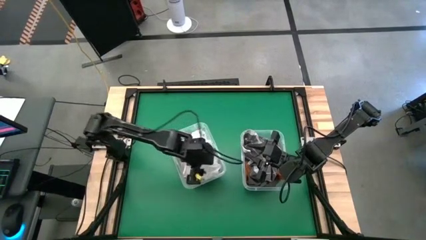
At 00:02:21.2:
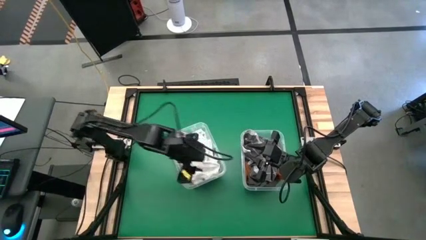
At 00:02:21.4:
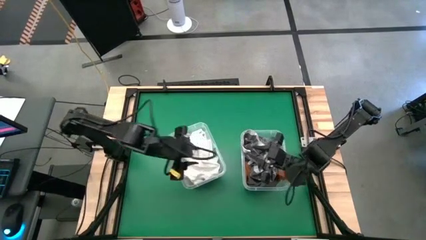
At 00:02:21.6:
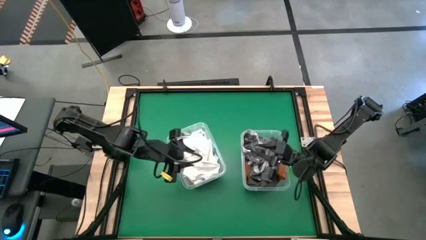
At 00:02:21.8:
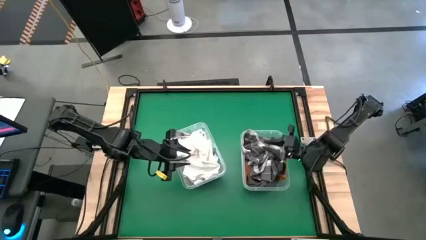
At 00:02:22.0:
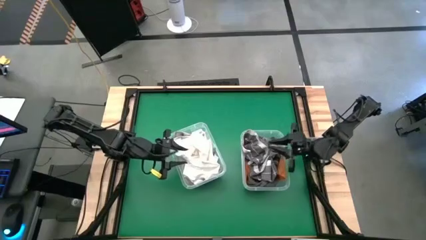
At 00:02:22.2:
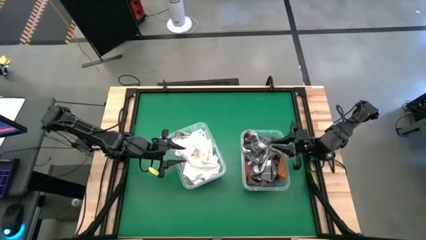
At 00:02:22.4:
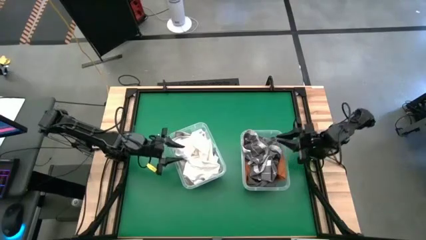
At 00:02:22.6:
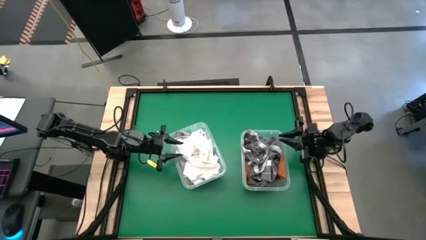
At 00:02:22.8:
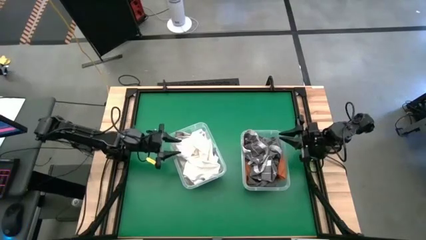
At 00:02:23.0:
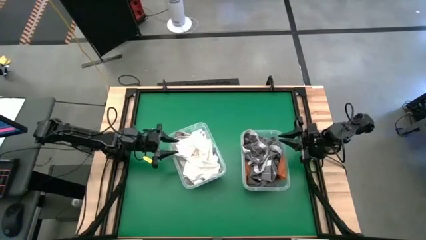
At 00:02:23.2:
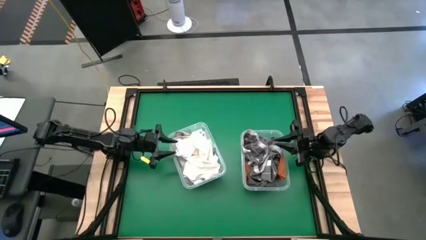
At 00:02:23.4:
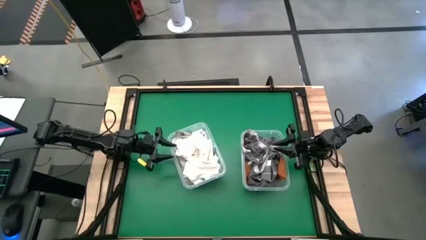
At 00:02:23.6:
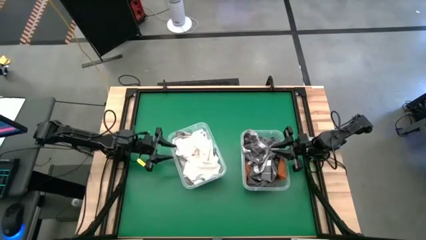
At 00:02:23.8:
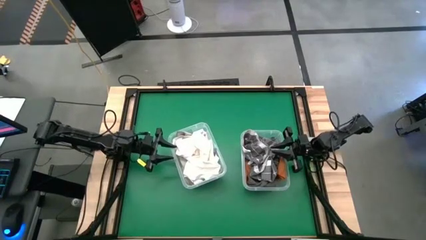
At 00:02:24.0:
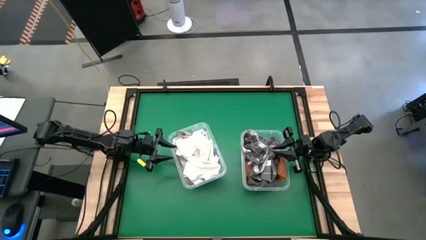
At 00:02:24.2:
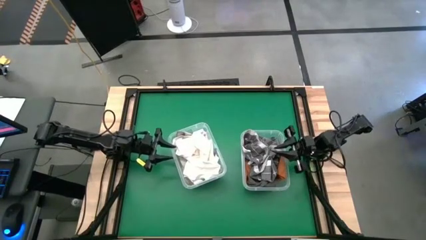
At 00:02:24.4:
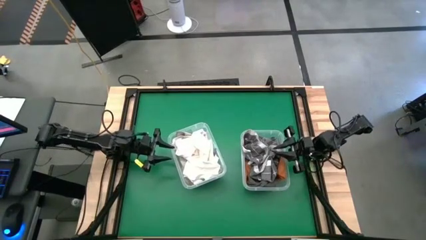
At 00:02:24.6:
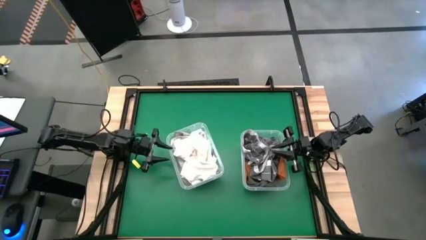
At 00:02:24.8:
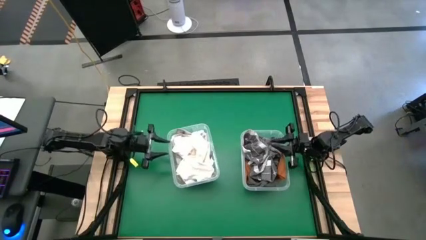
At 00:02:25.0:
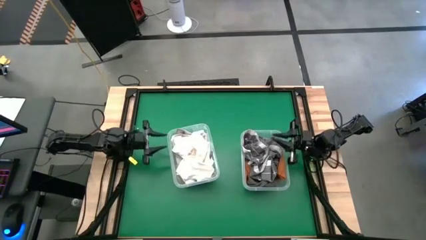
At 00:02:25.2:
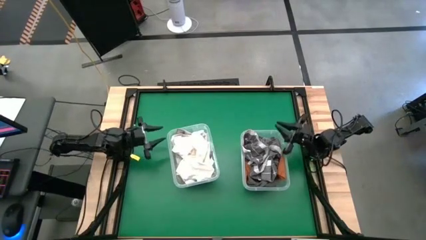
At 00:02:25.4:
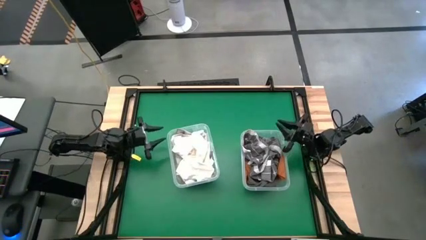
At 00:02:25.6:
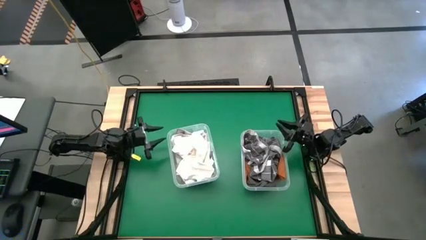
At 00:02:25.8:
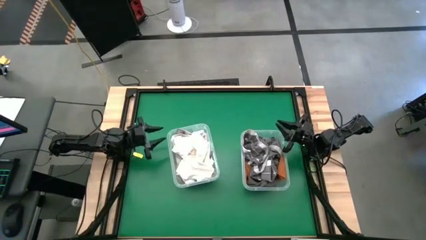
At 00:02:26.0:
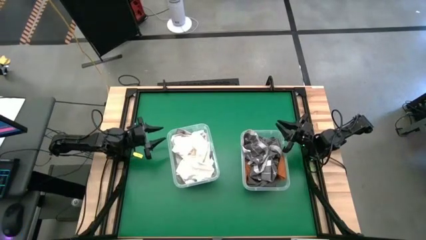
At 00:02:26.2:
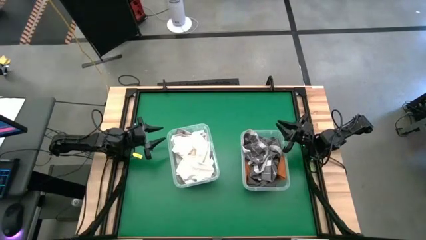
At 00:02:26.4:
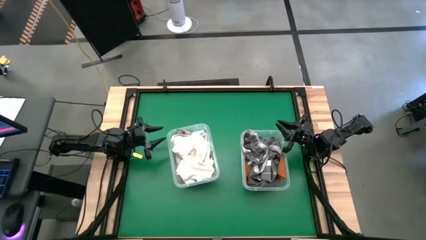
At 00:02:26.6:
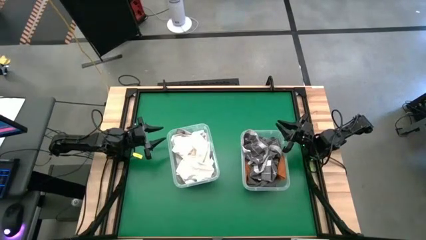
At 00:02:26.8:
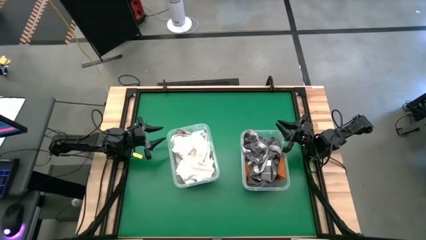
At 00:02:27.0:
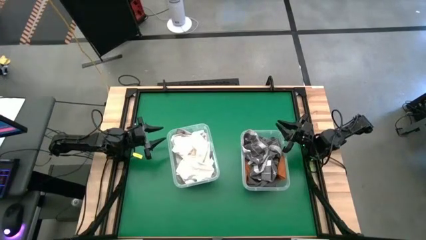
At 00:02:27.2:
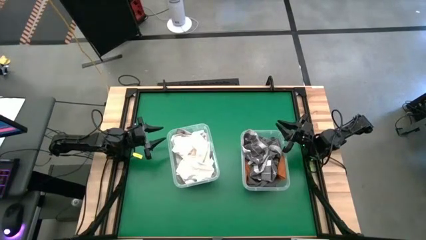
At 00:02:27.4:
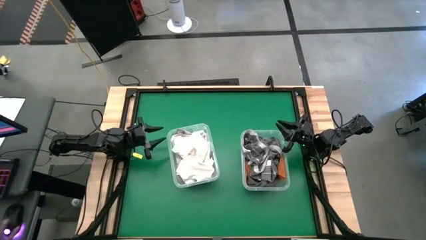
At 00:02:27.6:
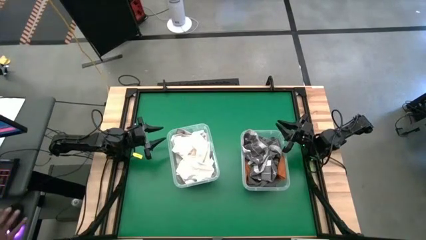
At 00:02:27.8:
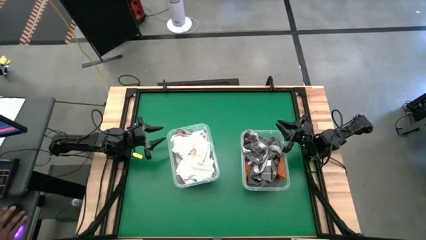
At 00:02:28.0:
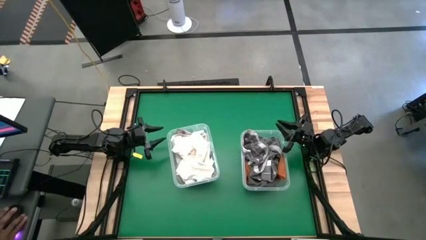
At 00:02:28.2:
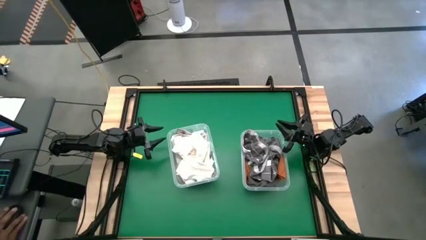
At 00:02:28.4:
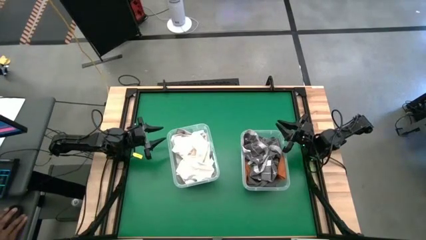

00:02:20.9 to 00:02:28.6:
Task: Sort microfiber towel by color & place in baskets
Return to Home Position
